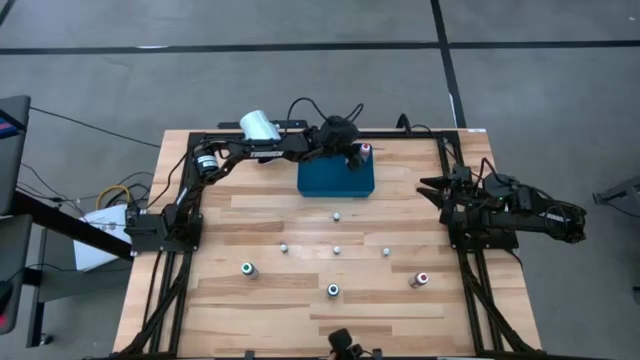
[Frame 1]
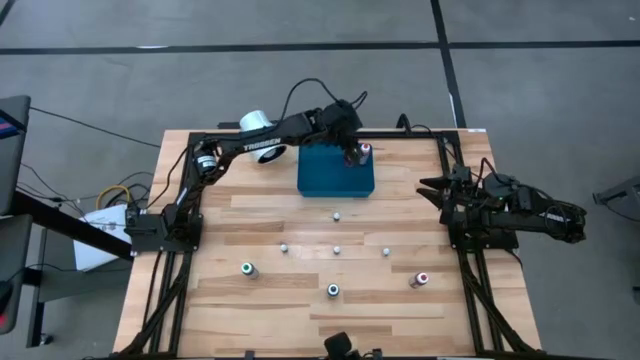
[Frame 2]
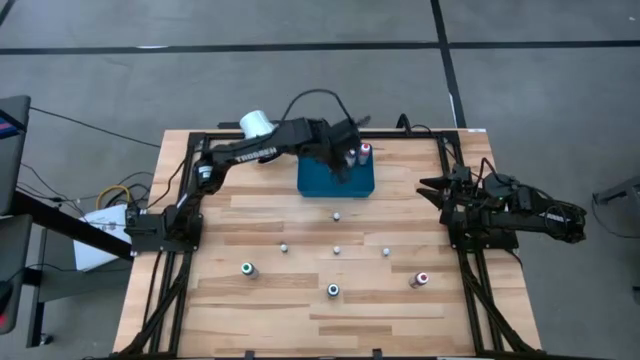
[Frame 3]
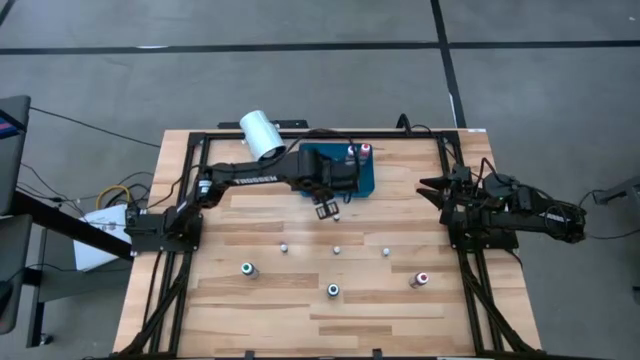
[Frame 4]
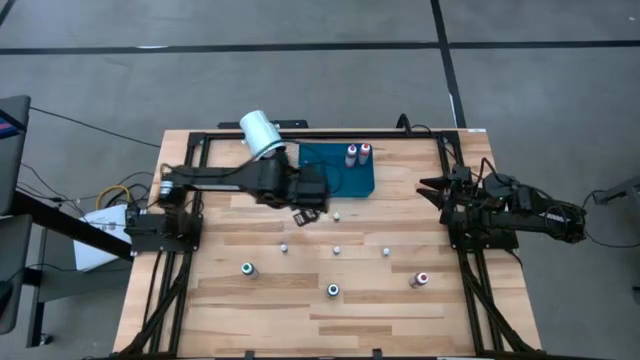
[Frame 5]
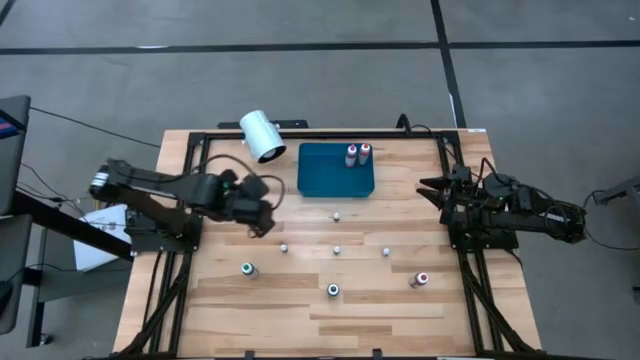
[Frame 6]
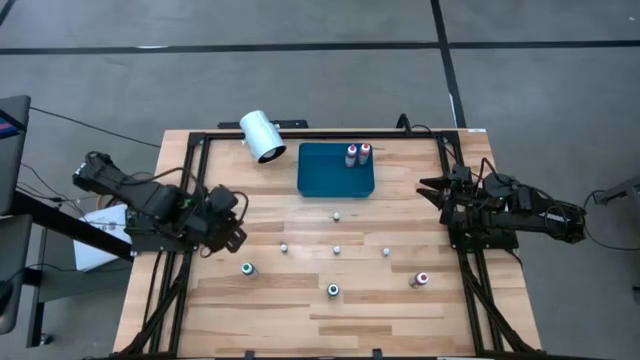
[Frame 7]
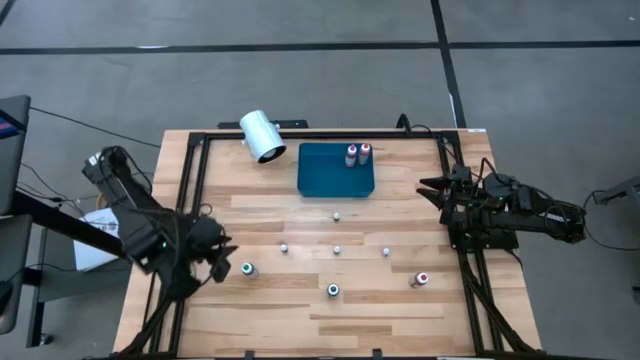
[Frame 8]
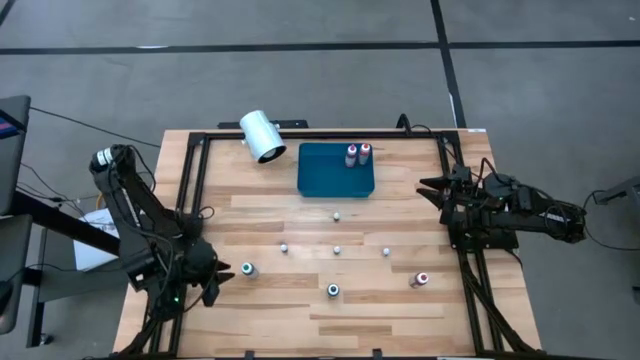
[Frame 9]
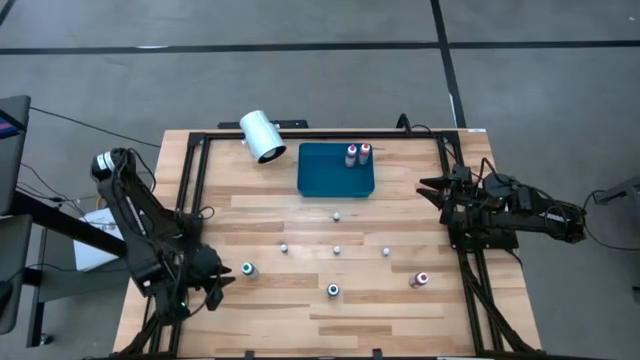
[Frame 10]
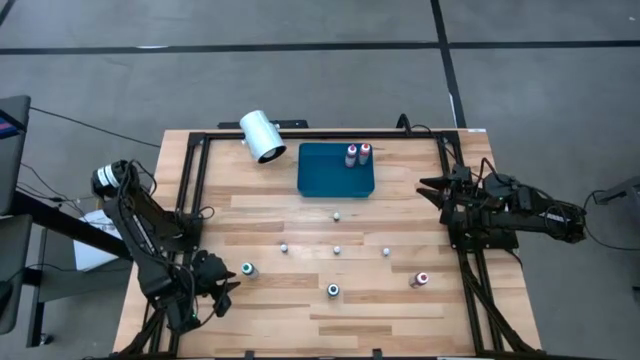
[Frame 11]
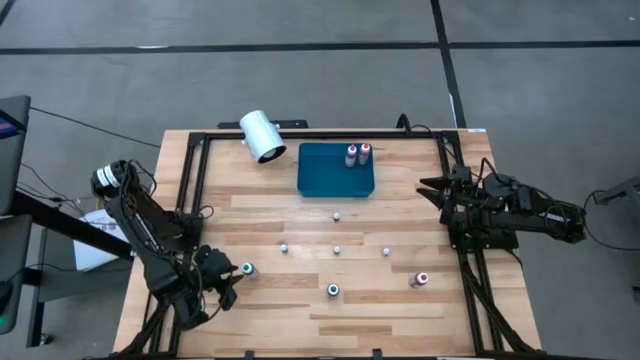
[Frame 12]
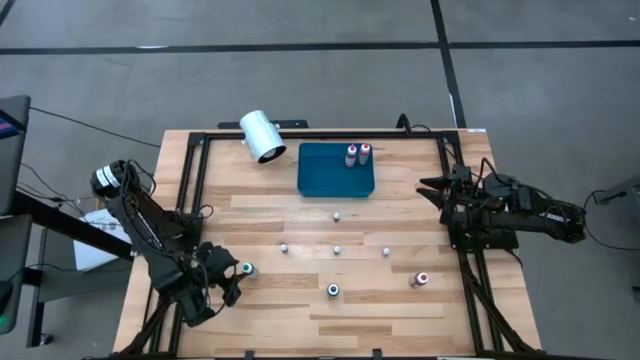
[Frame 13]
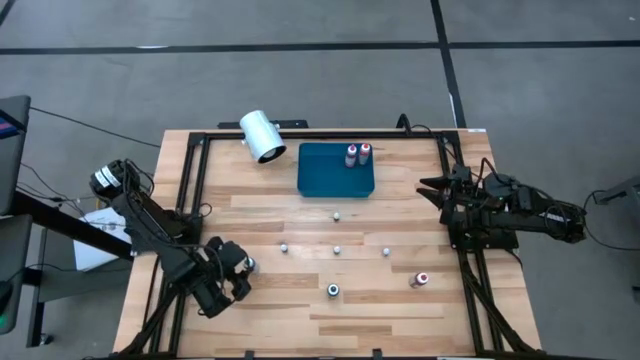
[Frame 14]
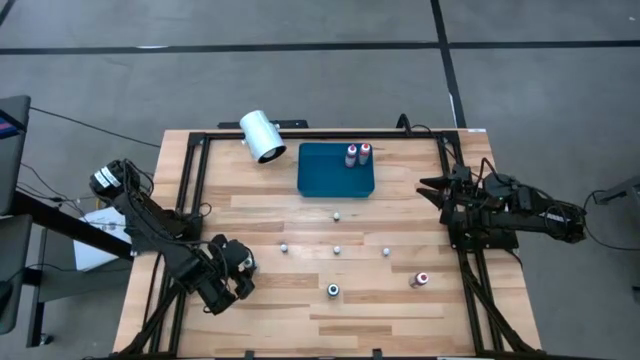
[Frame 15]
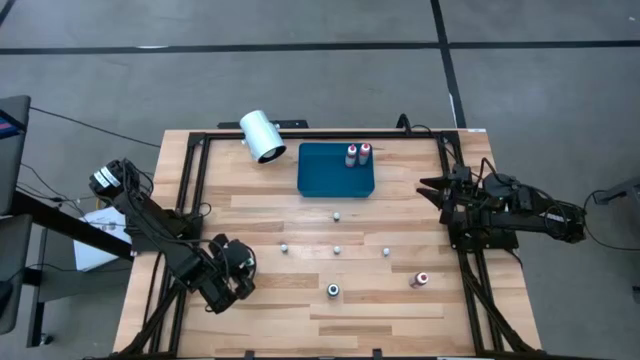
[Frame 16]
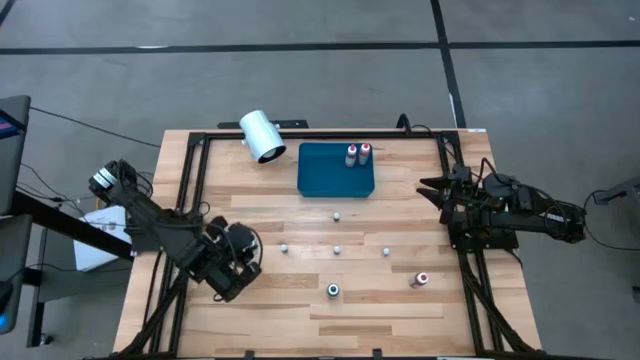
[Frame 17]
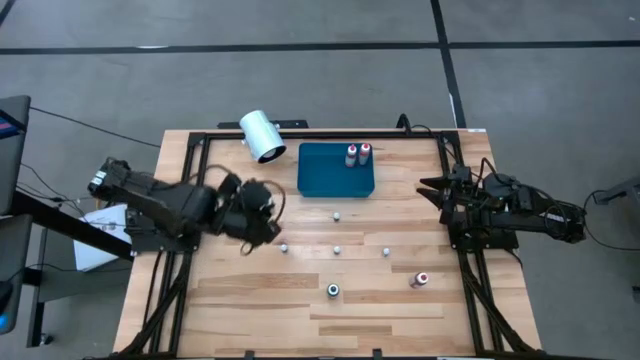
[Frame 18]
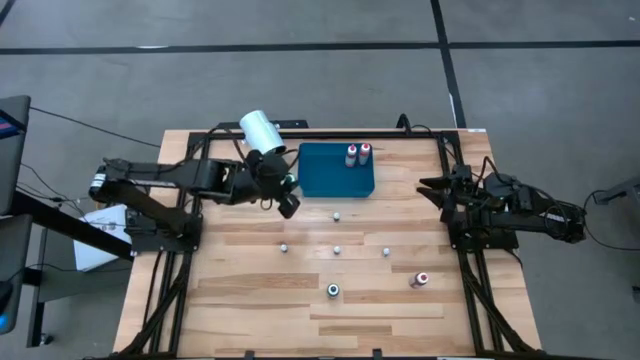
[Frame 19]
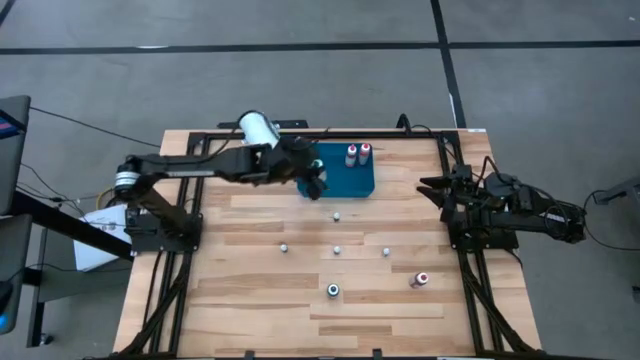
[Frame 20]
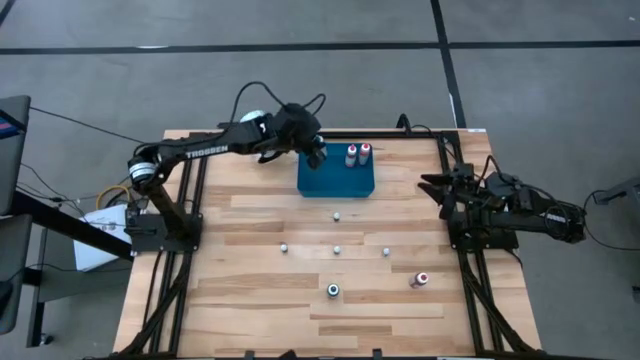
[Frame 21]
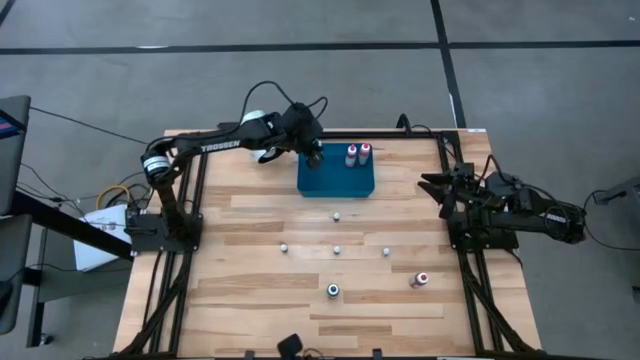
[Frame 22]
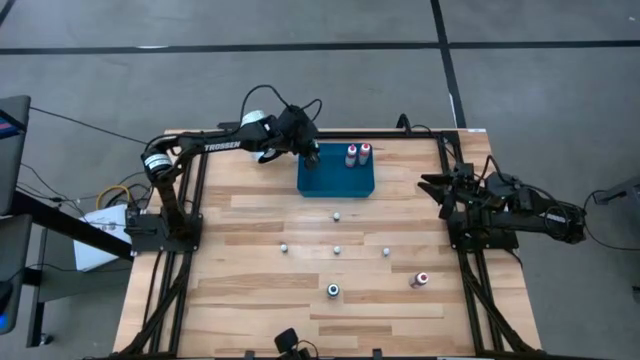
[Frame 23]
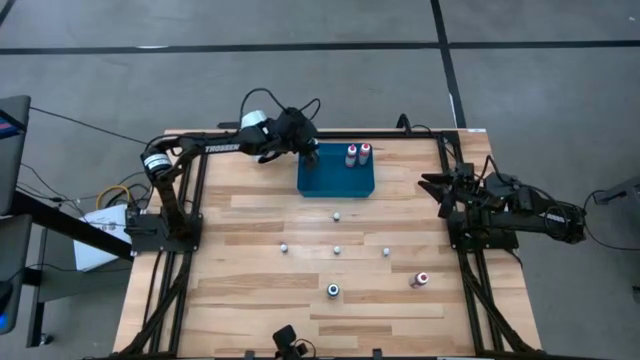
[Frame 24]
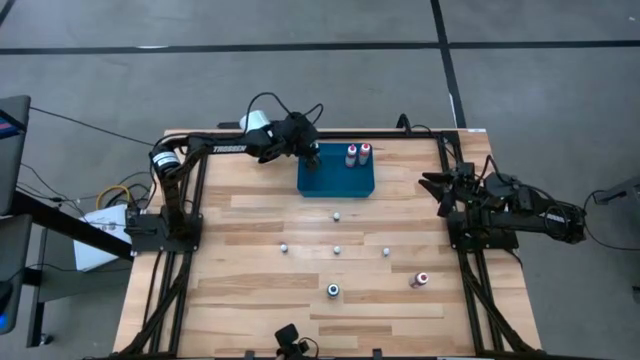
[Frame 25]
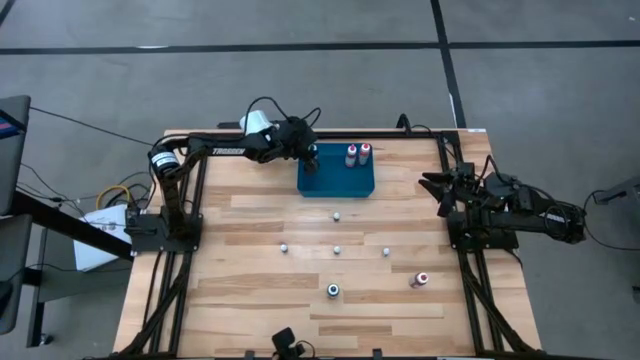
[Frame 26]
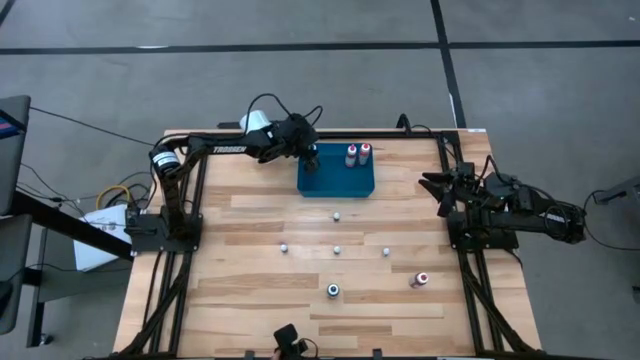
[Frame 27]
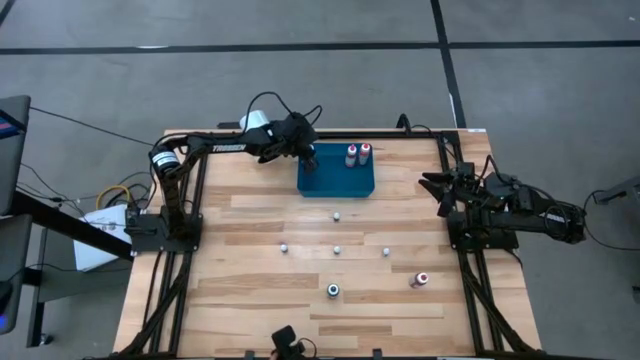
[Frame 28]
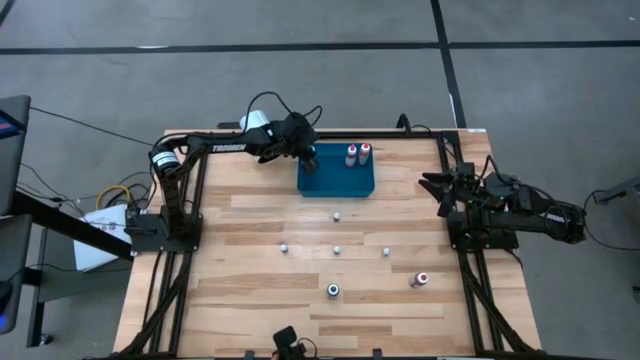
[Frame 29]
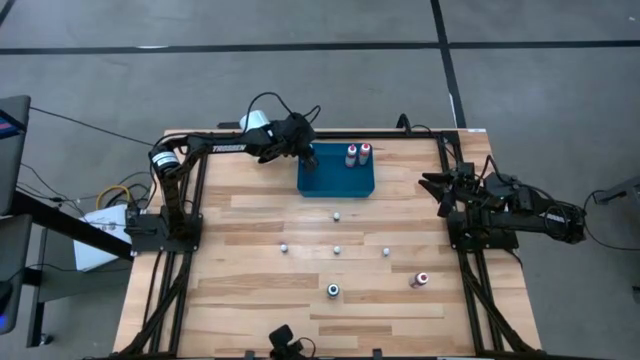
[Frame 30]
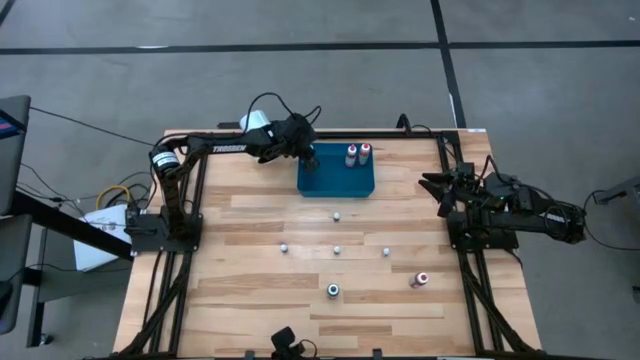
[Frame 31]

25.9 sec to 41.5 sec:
Task: Pick & Place food coloring
Put the large green food coloring bottle into the blue bin

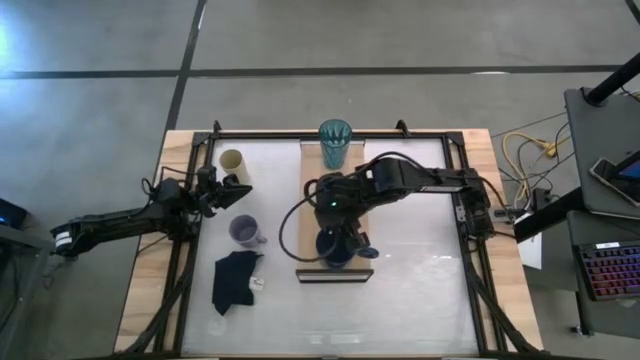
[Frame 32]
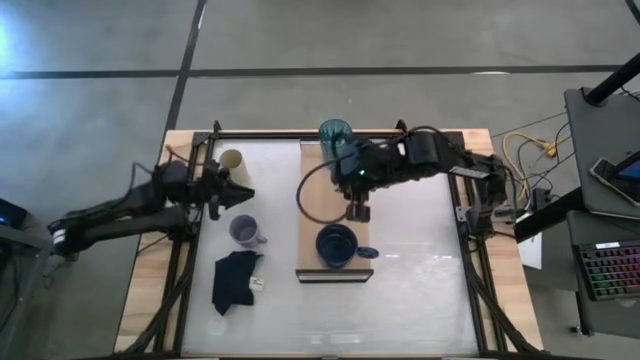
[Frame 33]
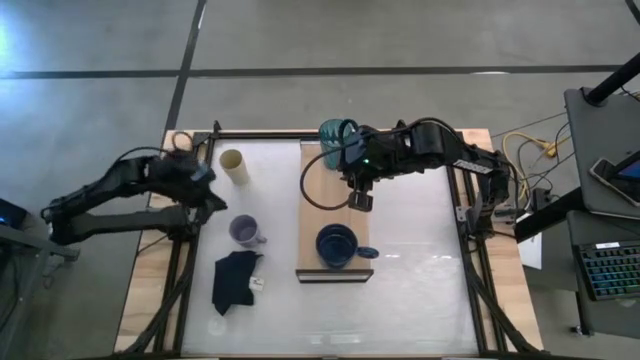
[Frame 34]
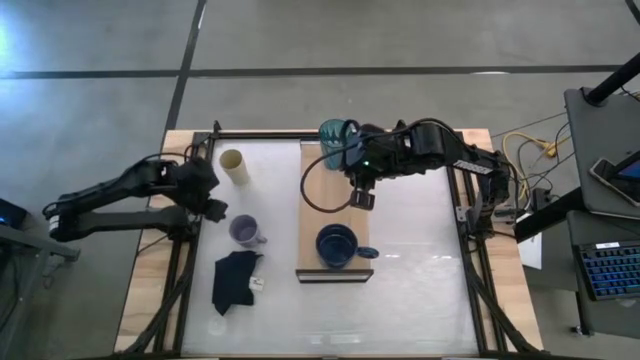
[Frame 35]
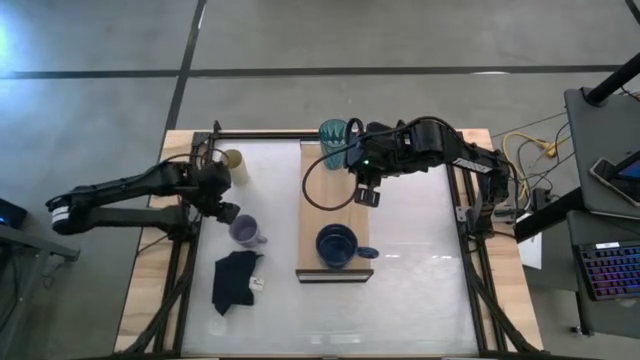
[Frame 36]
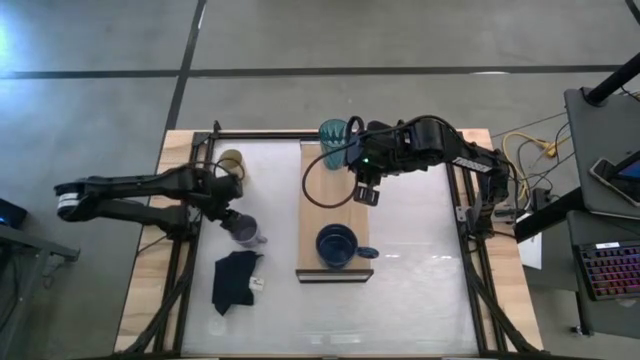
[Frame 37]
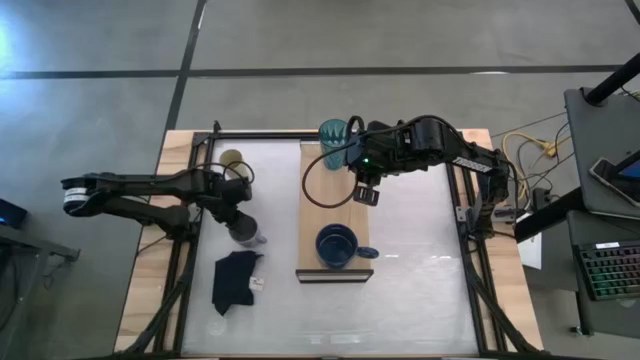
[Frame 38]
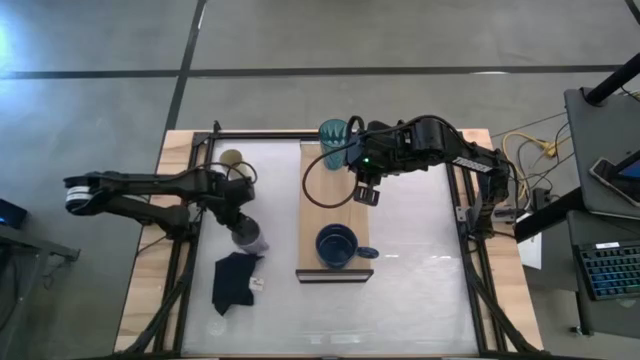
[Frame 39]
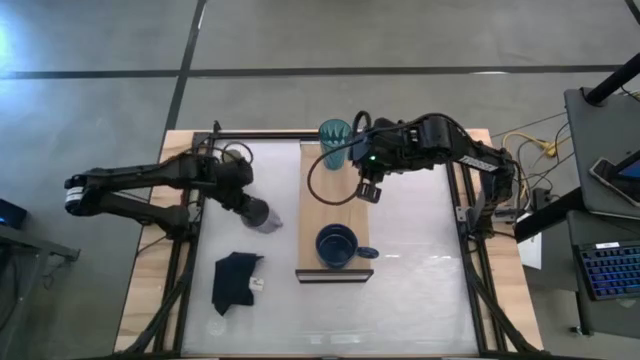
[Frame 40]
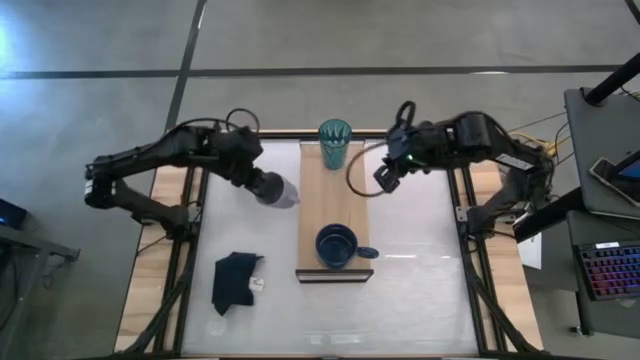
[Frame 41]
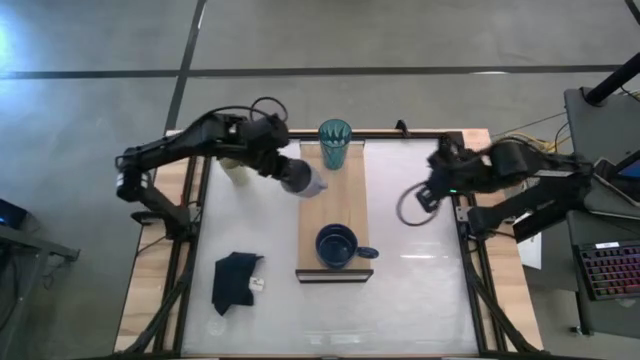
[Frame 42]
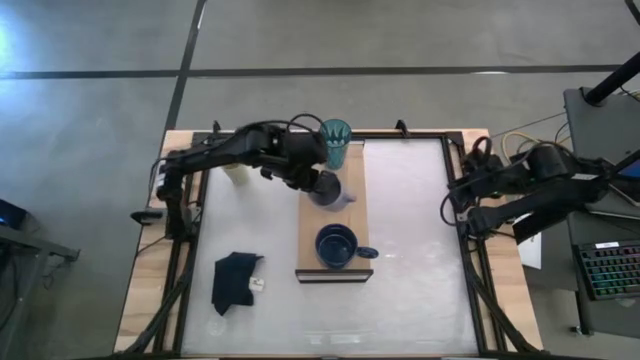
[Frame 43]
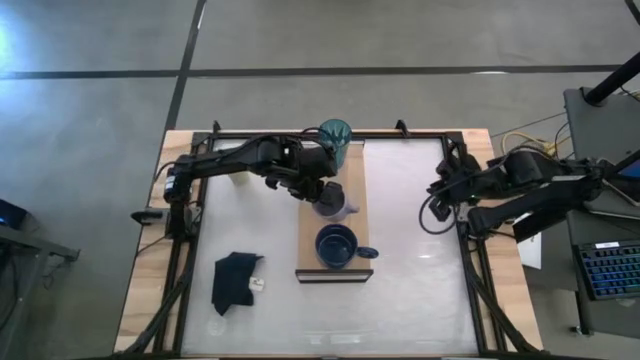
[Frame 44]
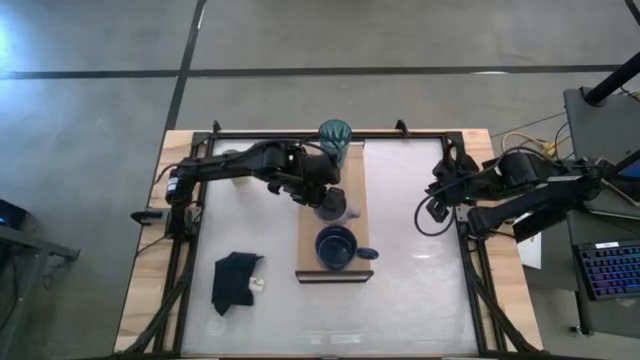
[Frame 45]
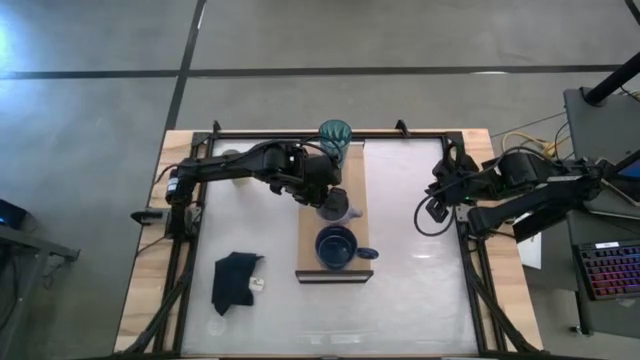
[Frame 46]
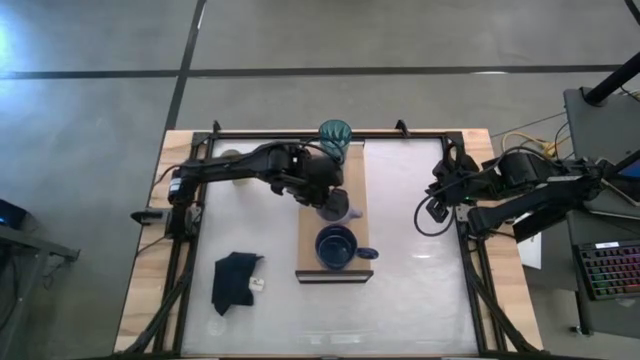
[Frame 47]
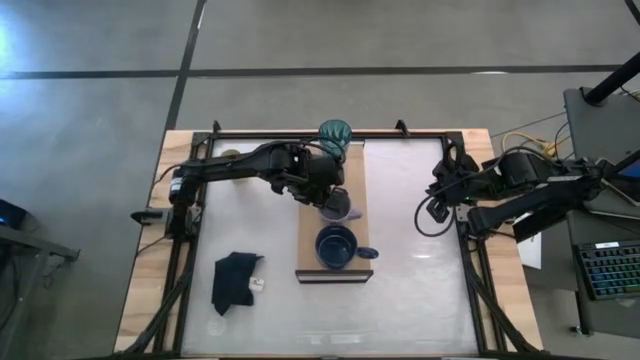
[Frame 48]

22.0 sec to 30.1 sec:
Task: Stack small to large cups/mugs on shelf
Put the purple mug on the shelf
